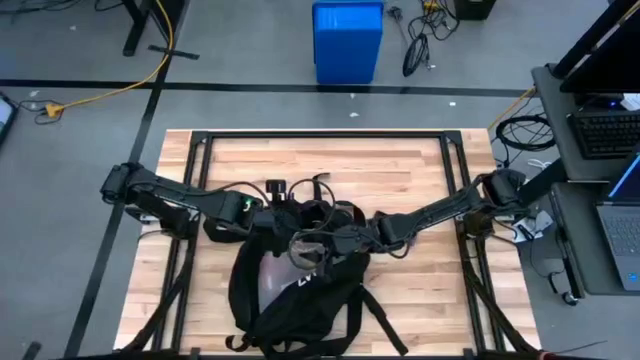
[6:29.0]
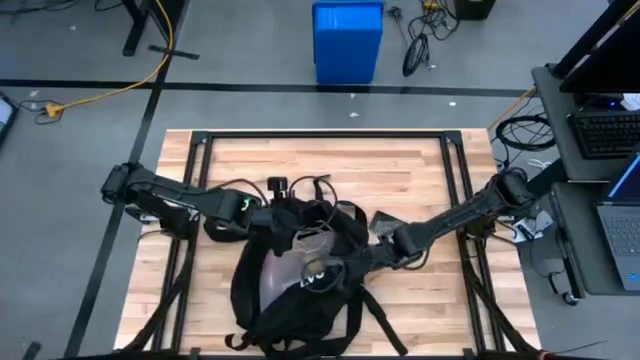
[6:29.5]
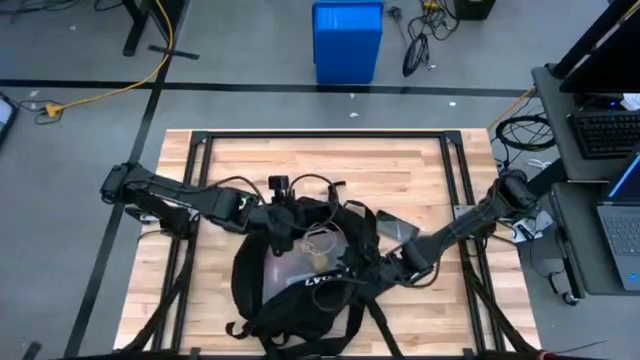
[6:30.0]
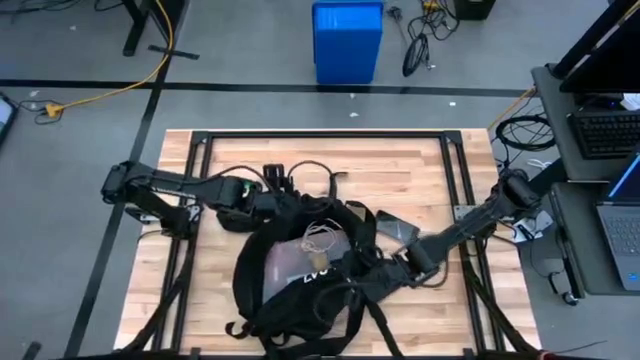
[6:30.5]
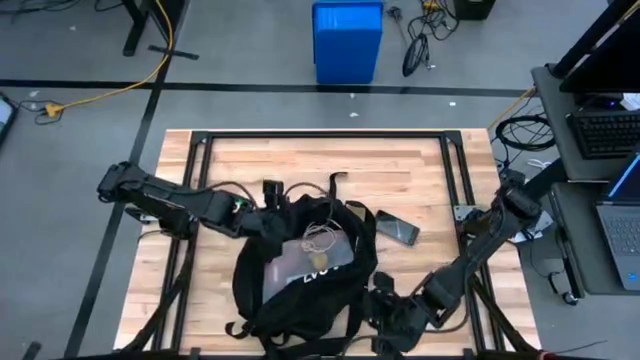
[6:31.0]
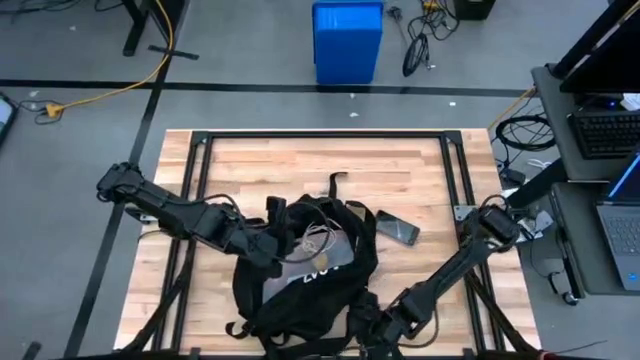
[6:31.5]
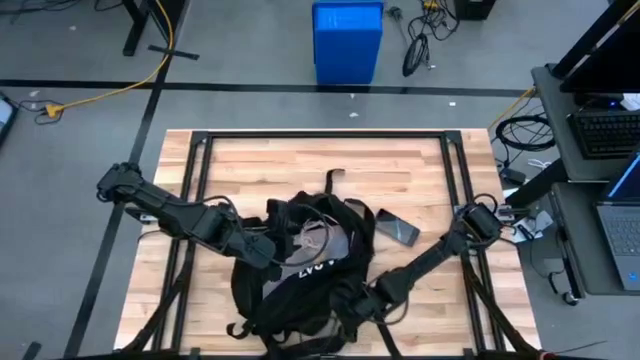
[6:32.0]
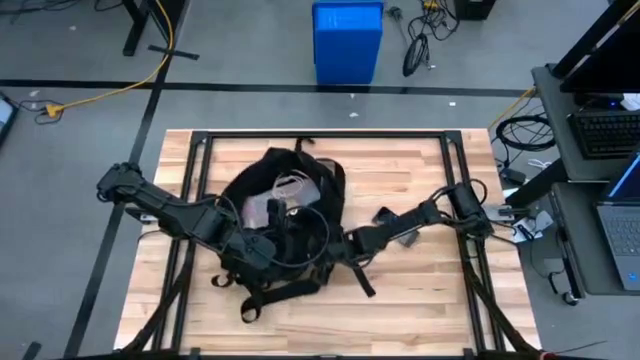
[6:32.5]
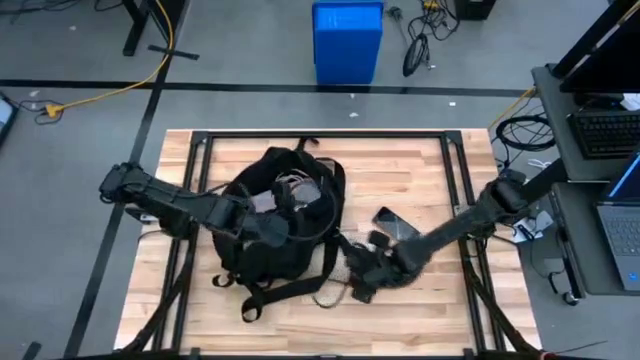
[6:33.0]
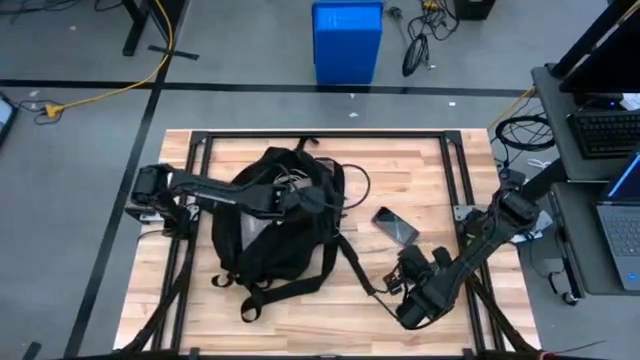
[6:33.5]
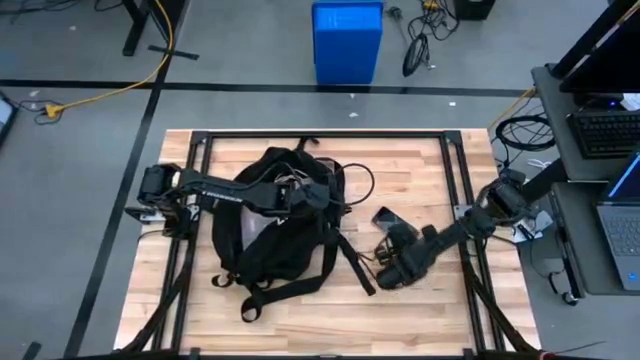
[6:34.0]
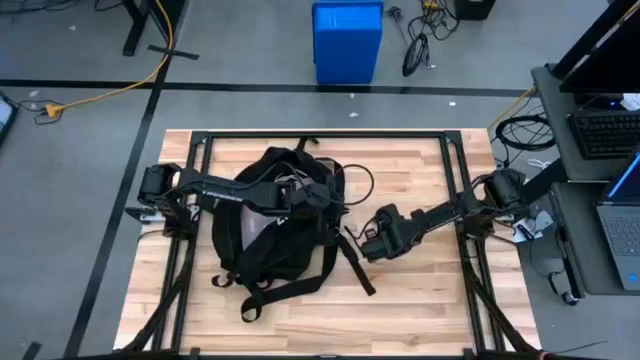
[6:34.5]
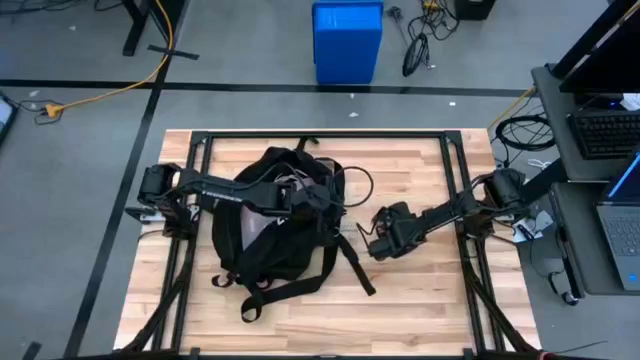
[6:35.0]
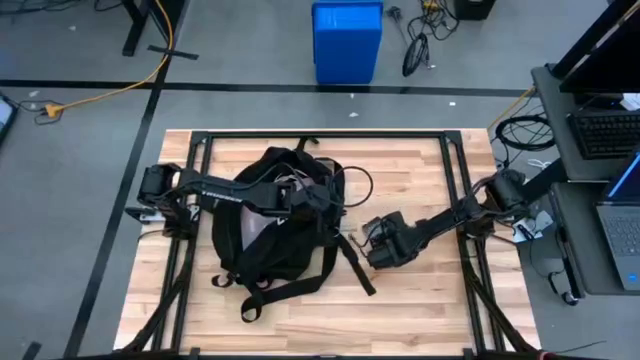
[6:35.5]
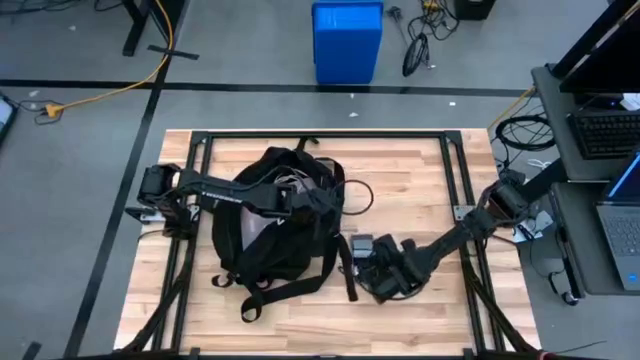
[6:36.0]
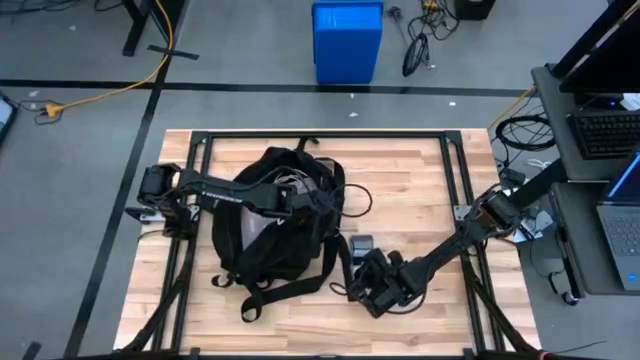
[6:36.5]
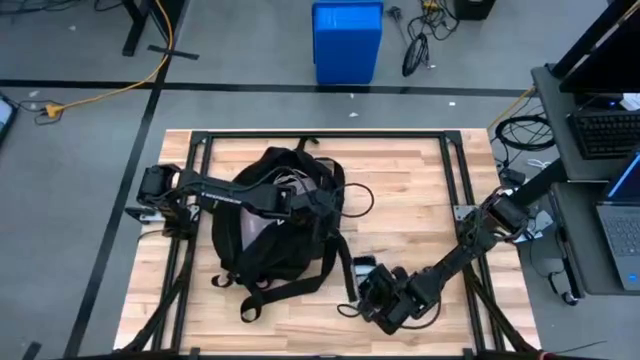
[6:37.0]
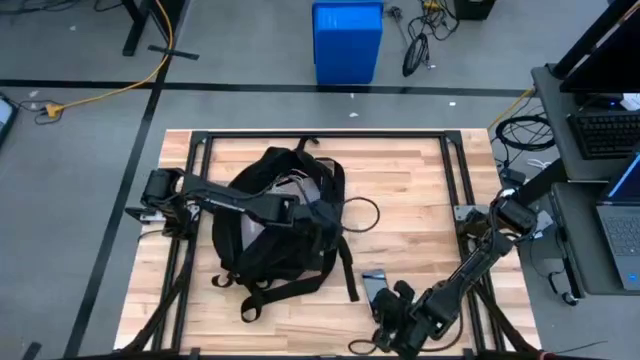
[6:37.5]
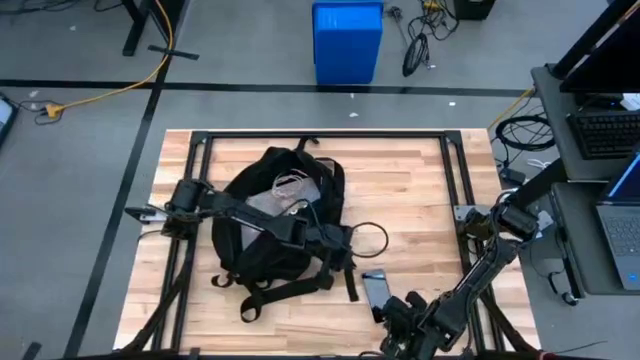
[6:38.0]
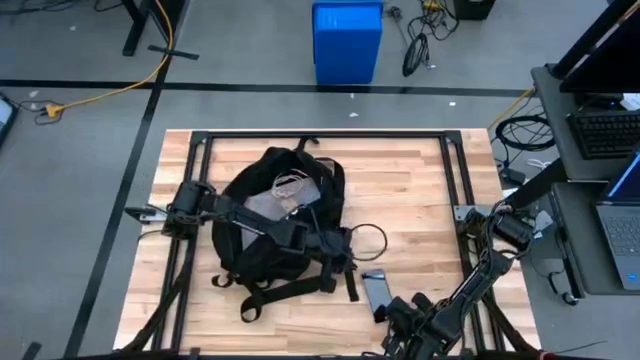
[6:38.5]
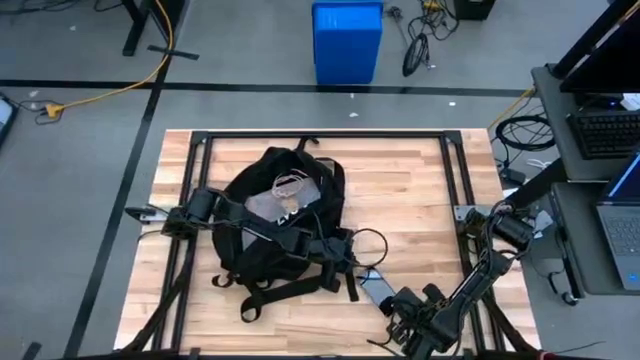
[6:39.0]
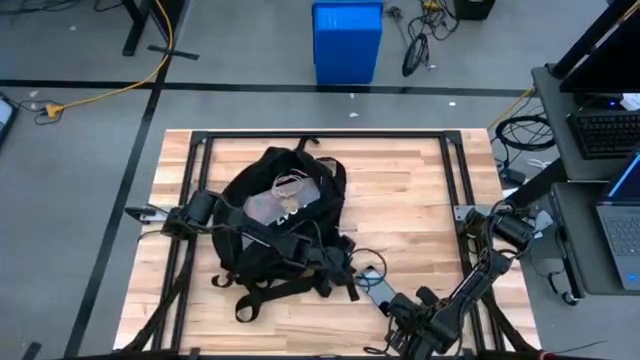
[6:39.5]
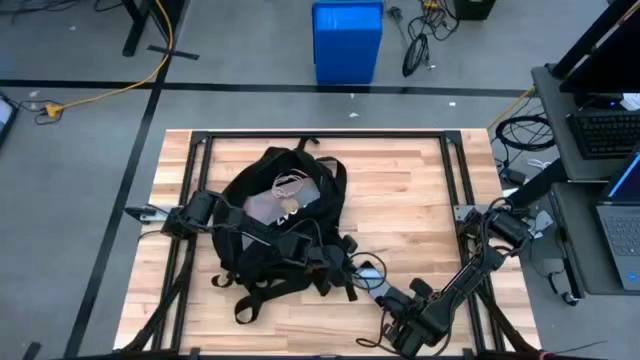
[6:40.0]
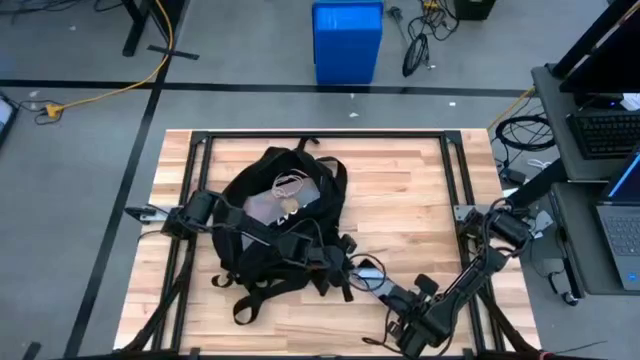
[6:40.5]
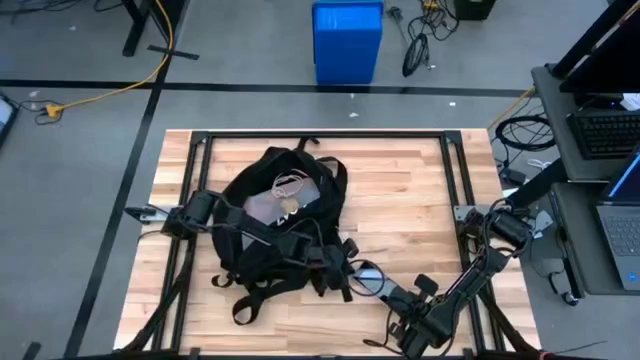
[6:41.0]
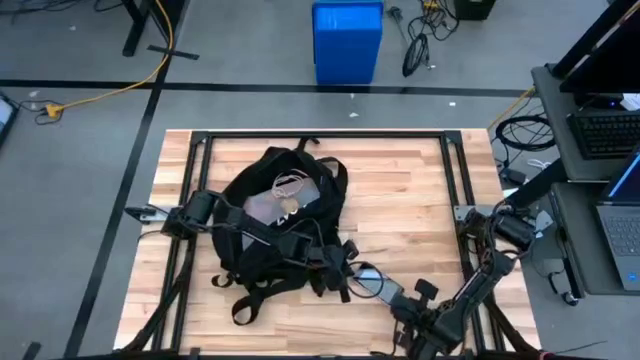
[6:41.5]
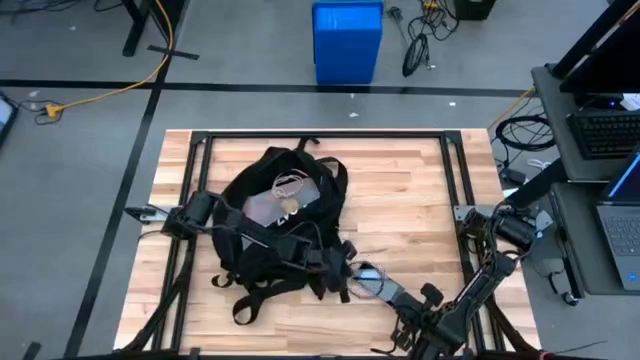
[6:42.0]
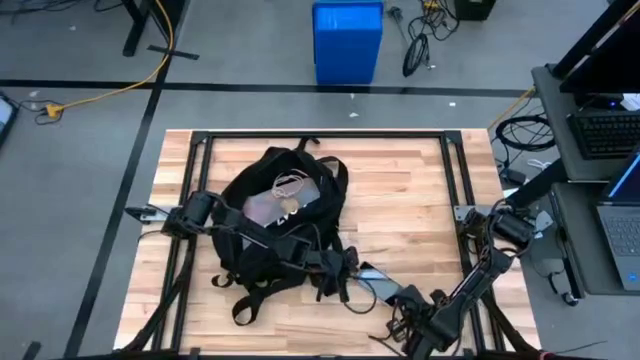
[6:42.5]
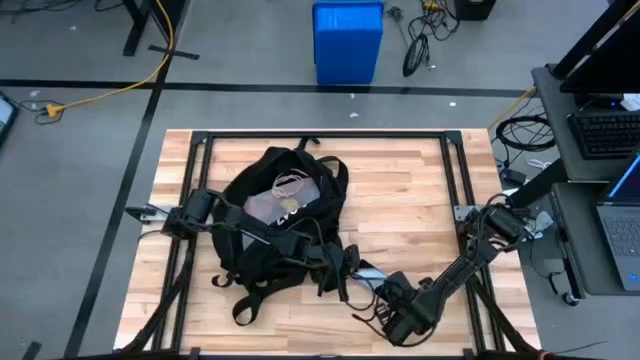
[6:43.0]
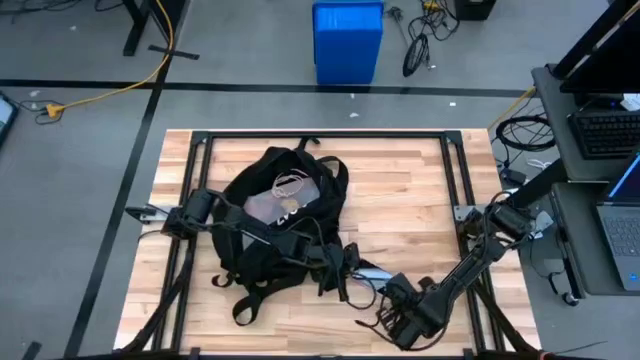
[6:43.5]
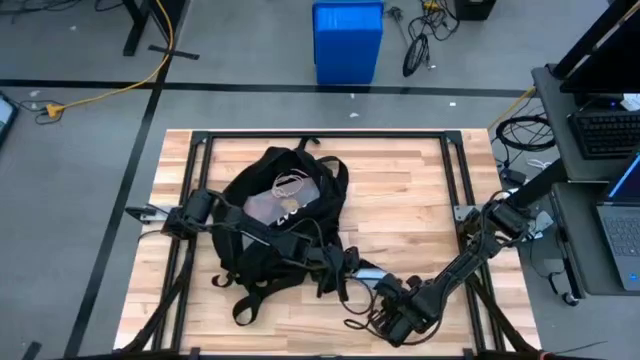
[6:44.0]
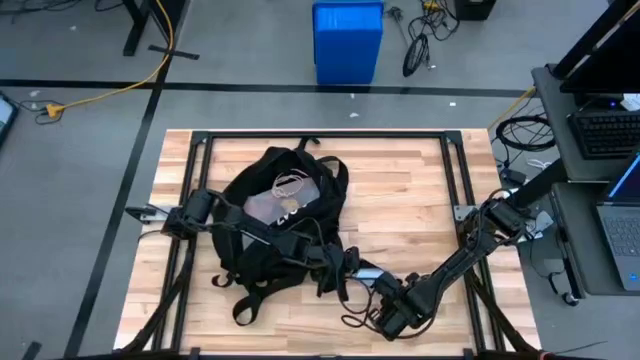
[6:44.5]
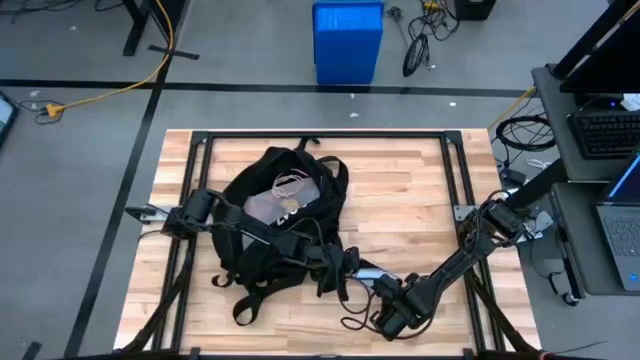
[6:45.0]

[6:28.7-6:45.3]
Task: Unpack backpack
Put the cellphone into the black backpack

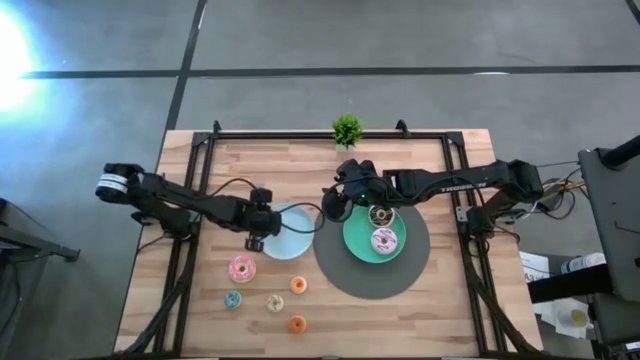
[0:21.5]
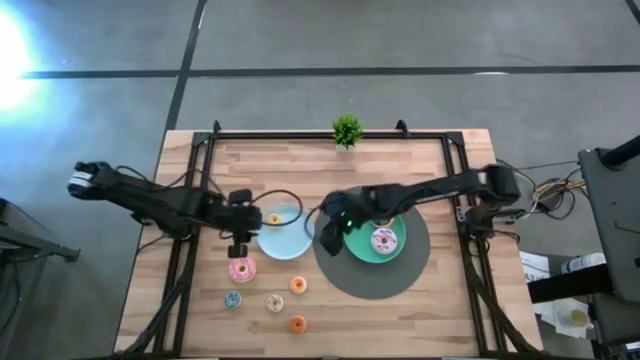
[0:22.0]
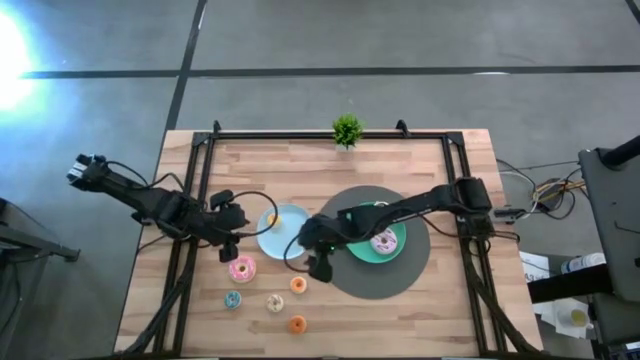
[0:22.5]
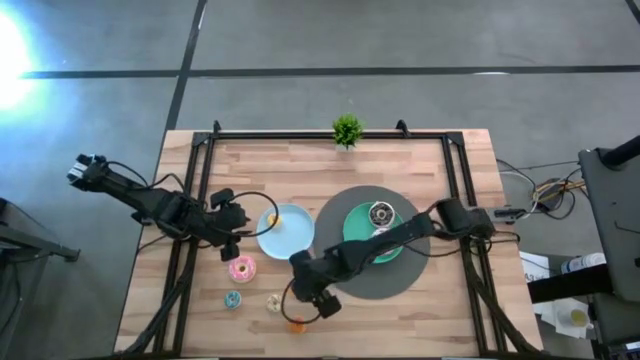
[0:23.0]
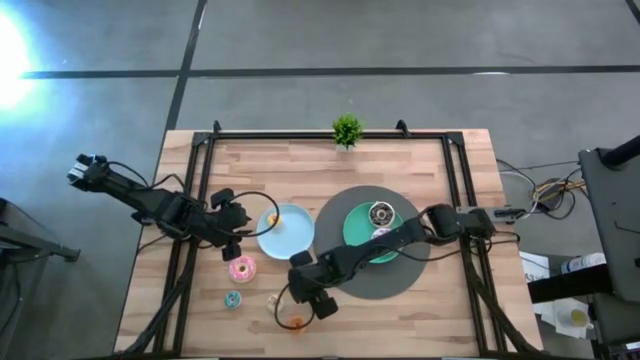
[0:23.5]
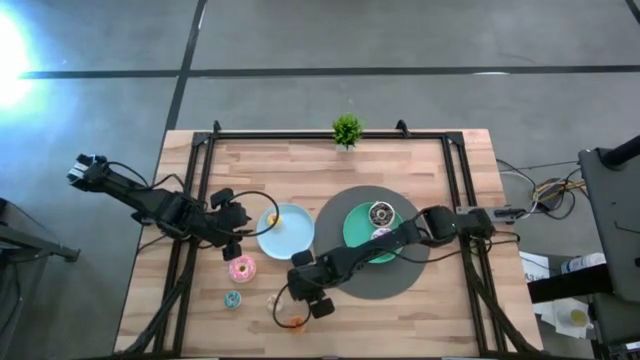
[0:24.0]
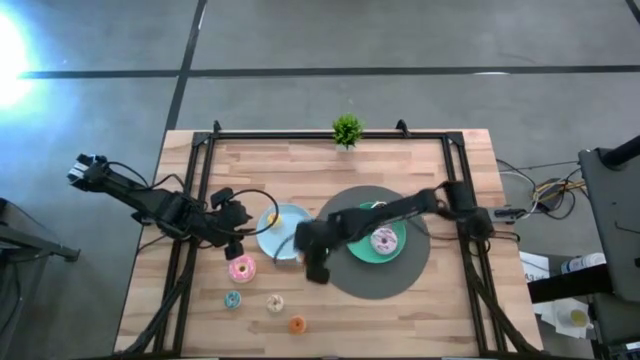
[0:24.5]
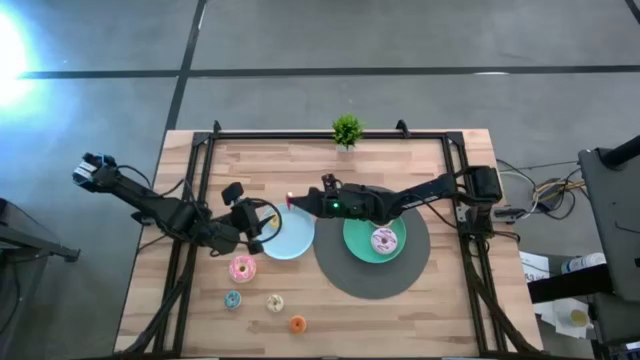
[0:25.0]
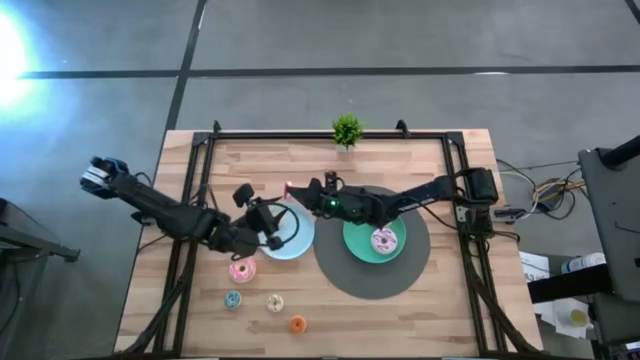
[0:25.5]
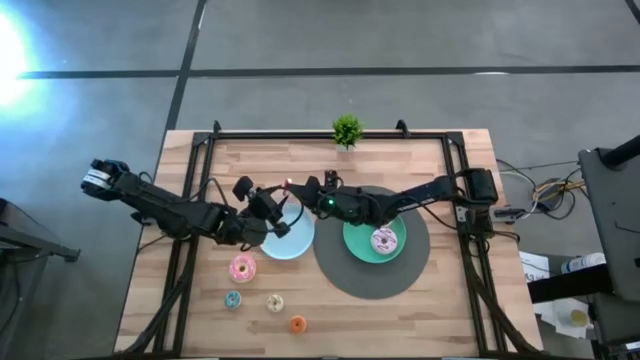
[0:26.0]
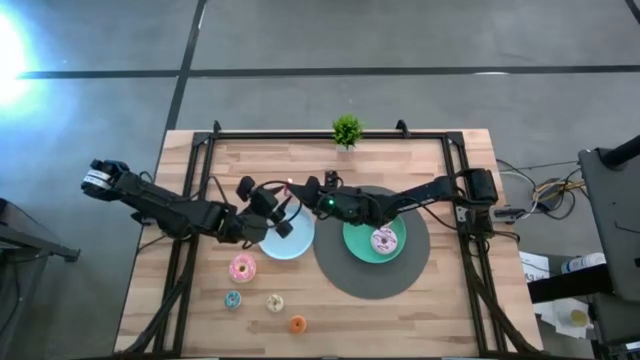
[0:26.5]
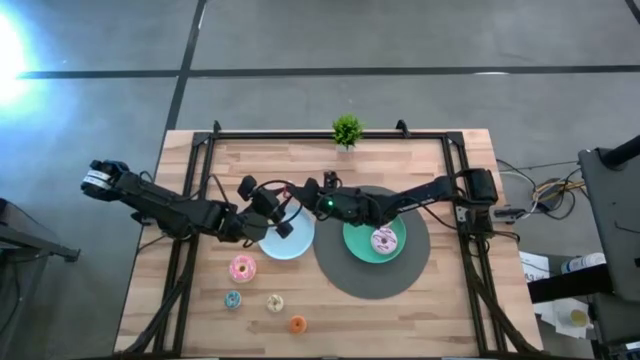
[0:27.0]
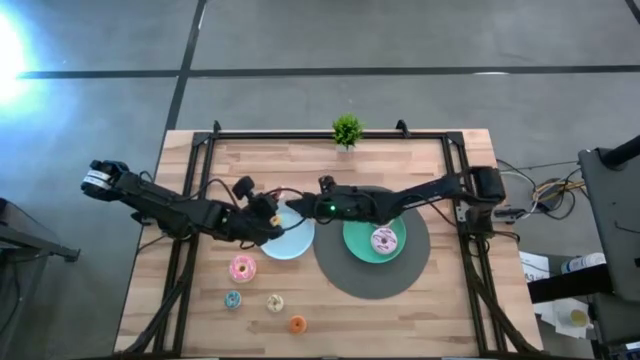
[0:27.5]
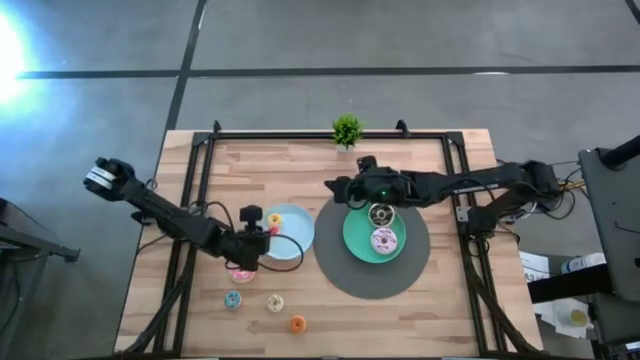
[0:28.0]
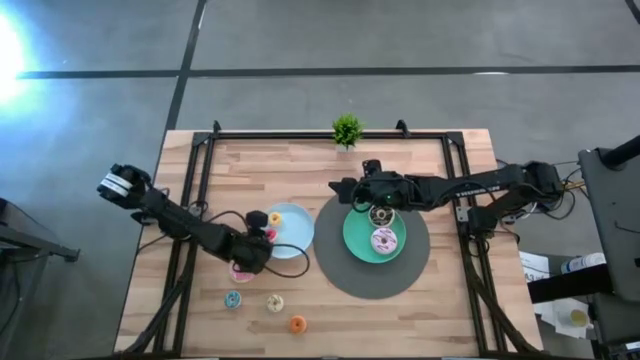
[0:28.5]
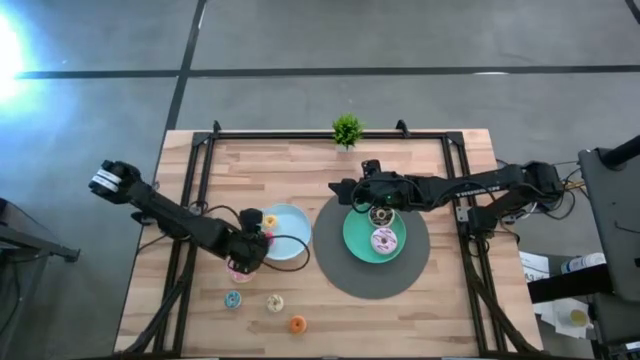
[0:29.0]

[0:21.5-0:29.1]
Task: Pick & Place donuts
Put the small red donut on the blue plate
